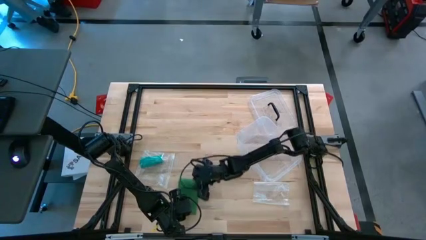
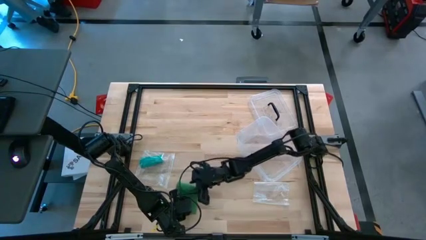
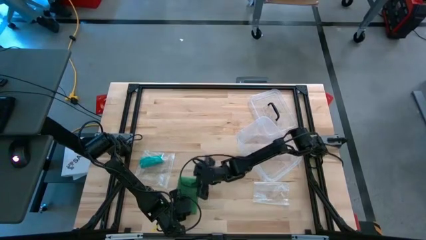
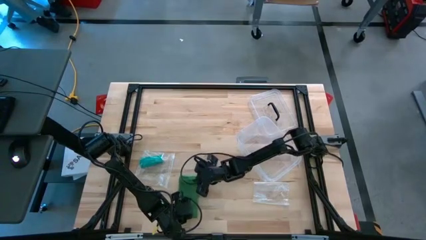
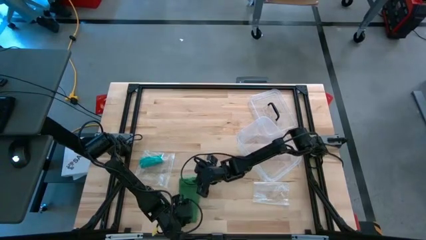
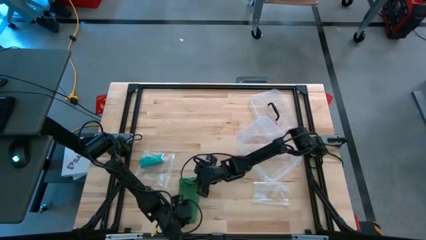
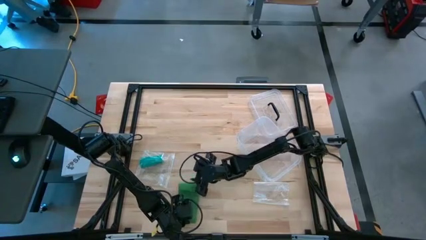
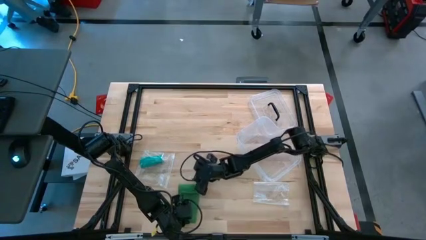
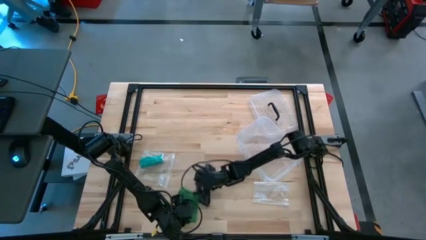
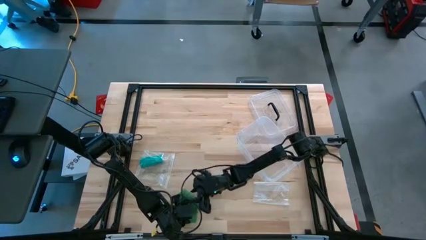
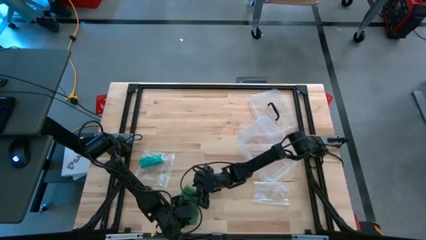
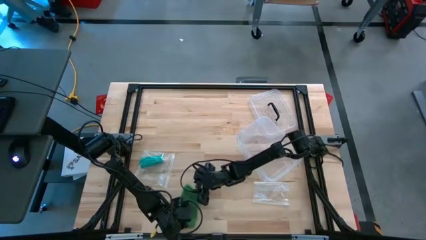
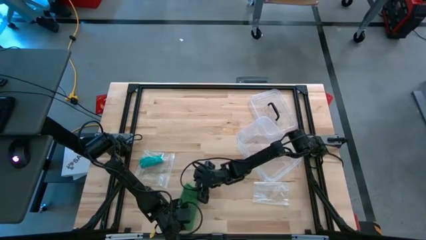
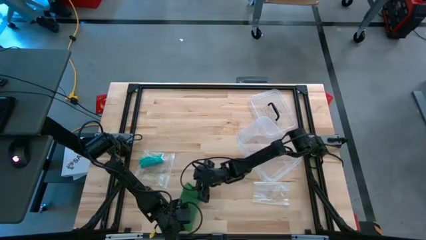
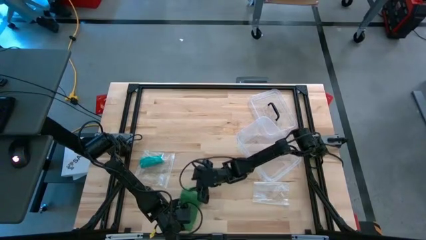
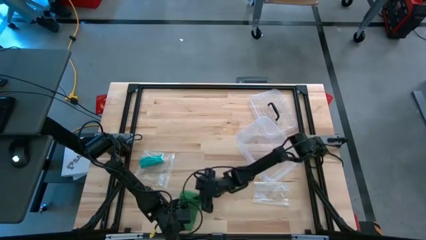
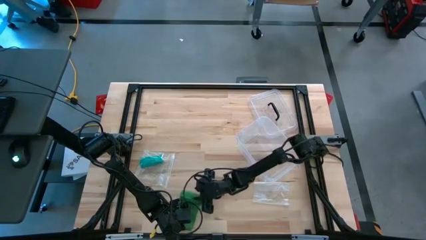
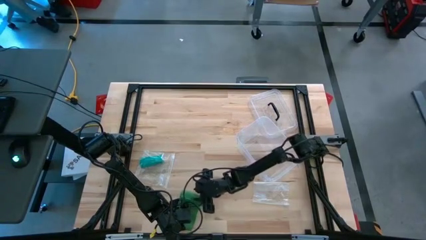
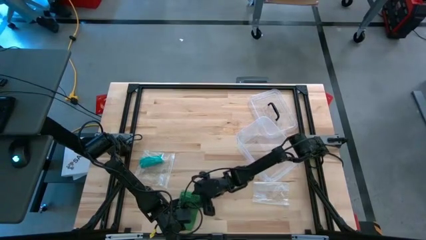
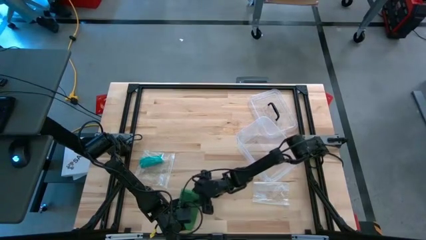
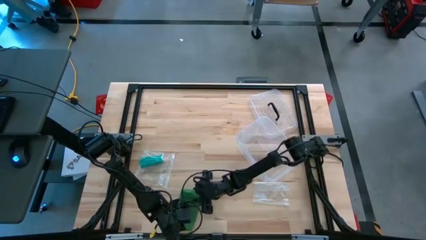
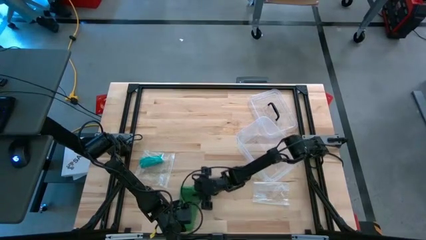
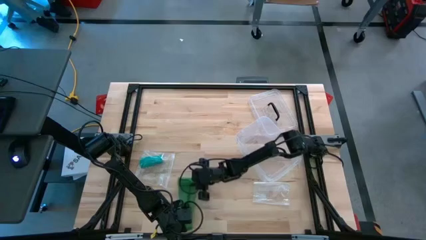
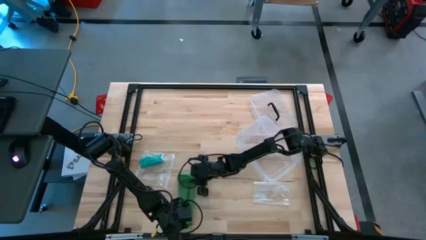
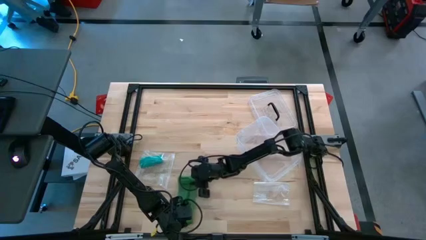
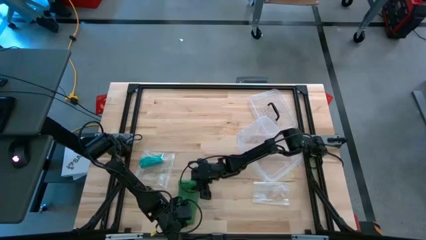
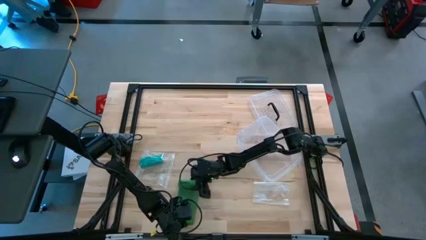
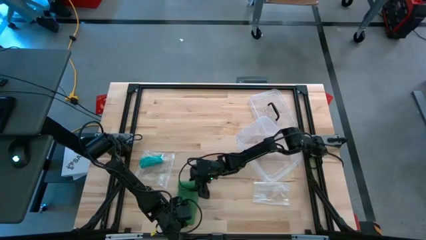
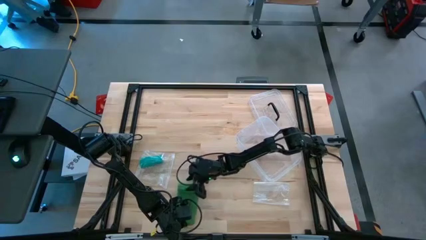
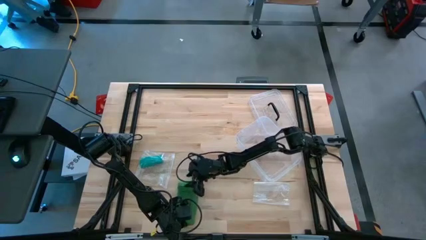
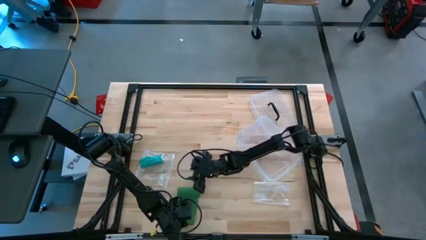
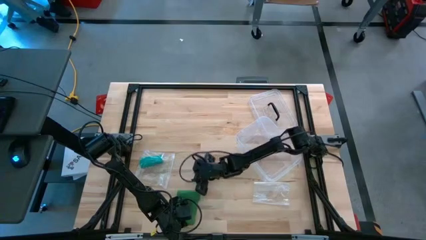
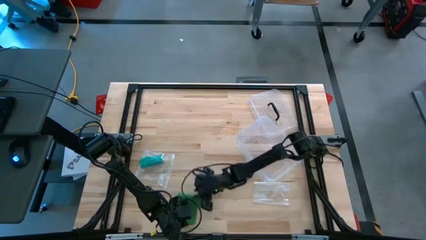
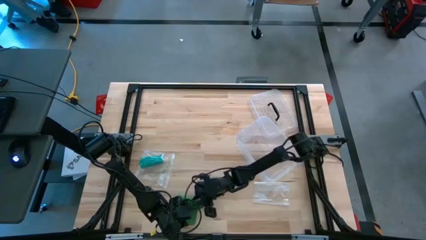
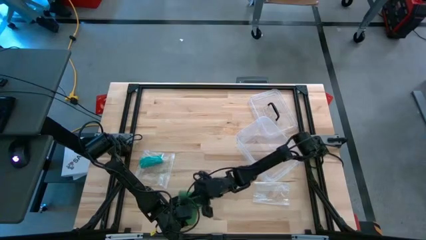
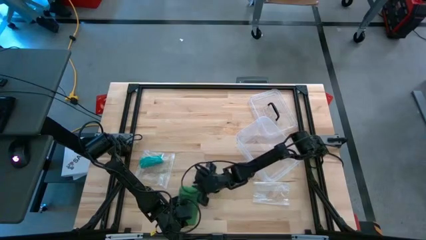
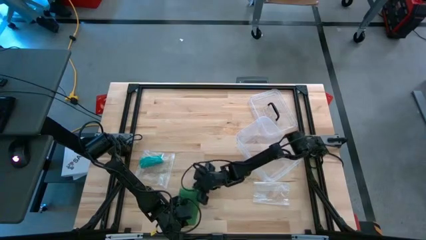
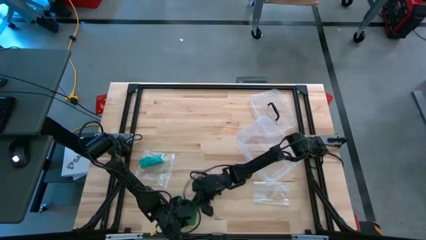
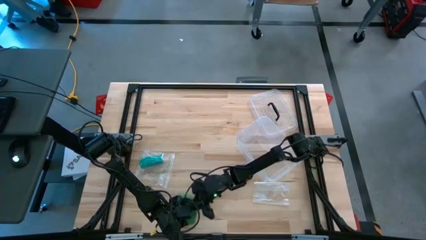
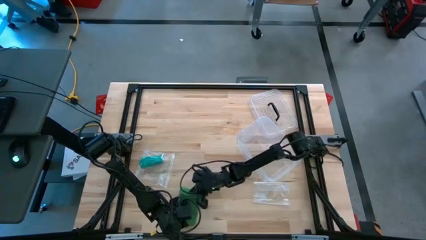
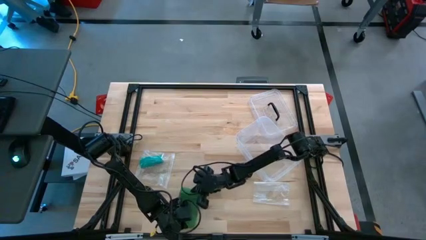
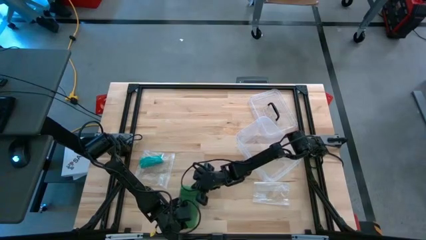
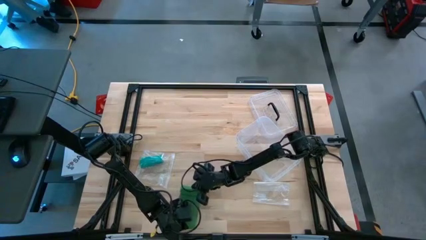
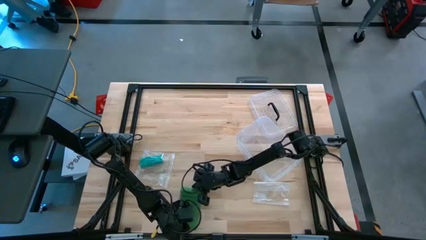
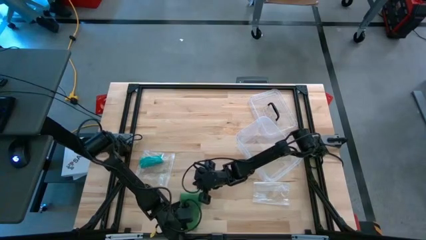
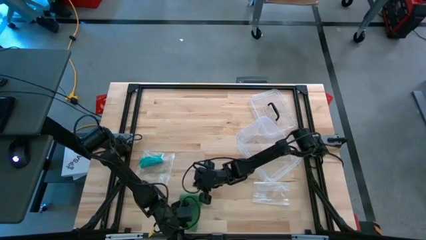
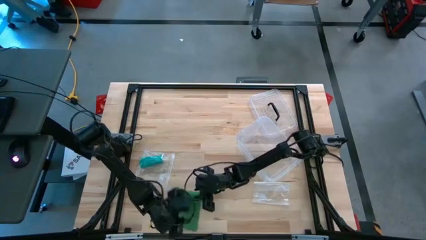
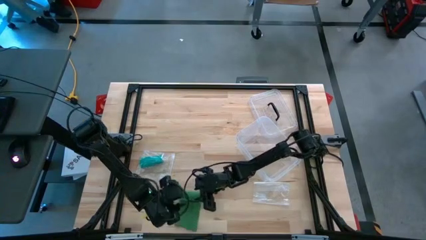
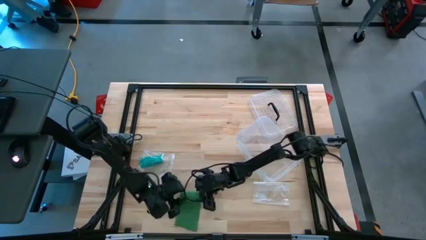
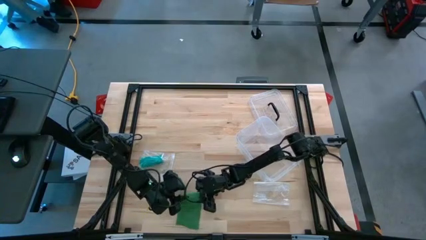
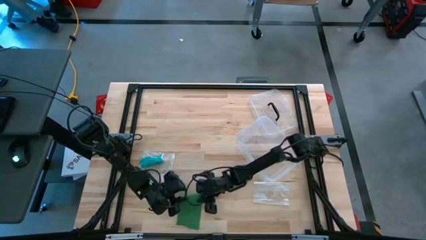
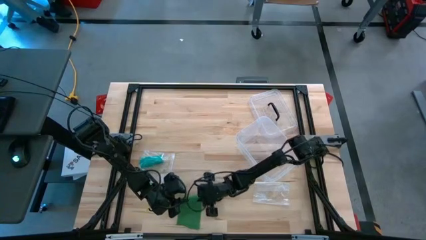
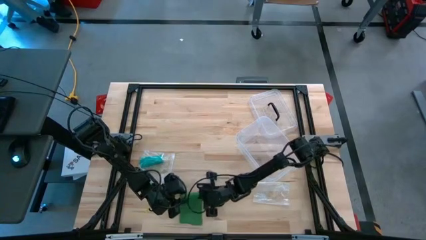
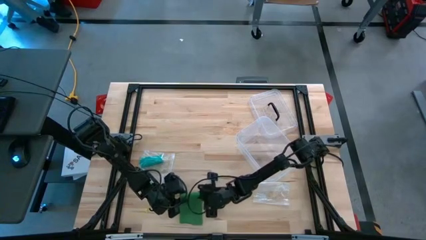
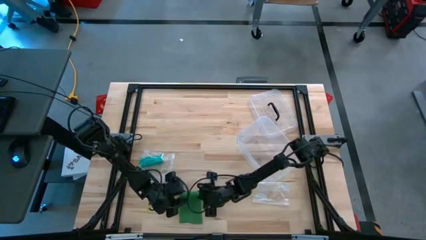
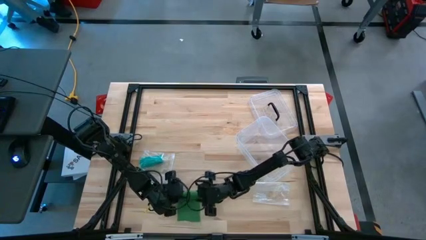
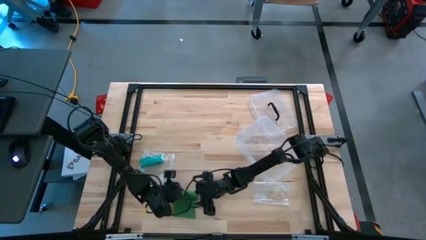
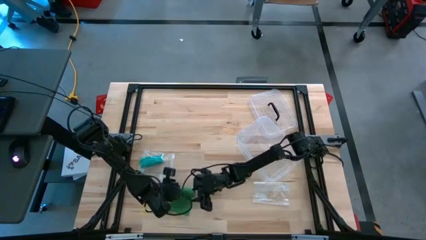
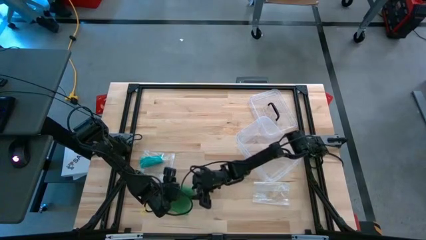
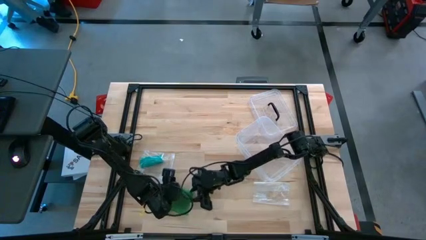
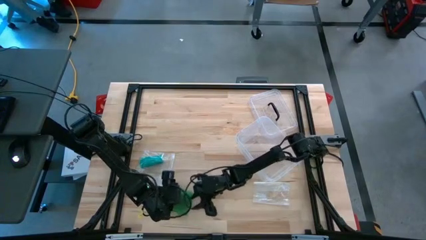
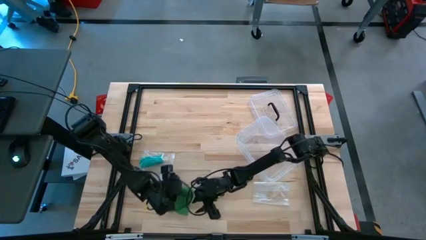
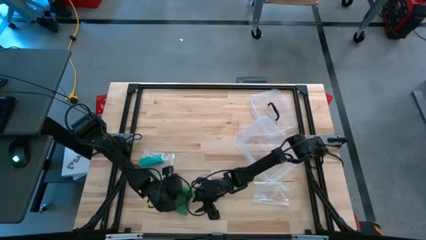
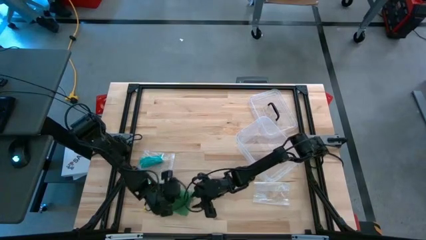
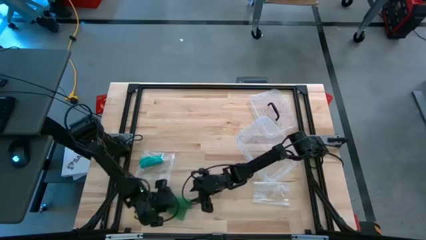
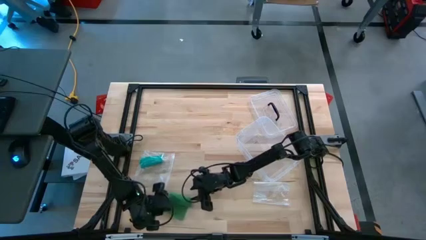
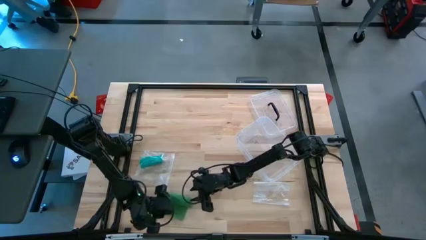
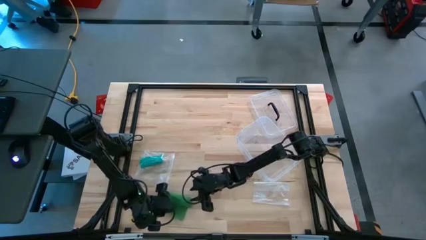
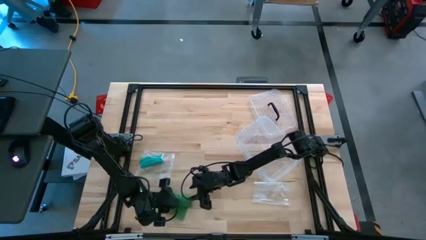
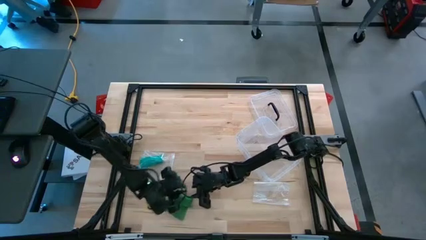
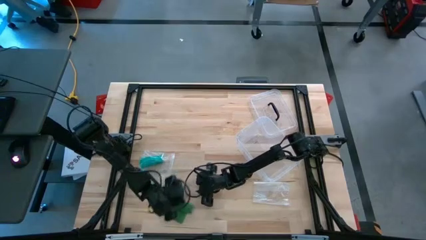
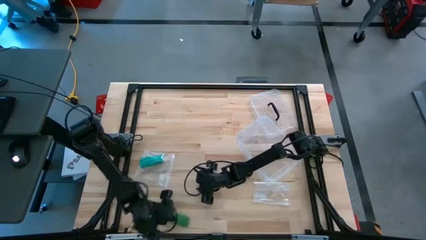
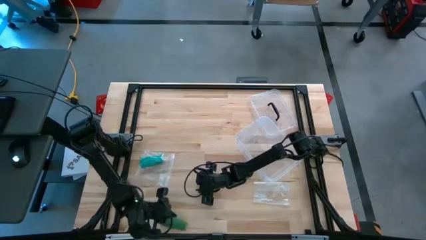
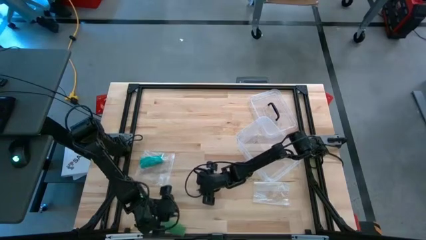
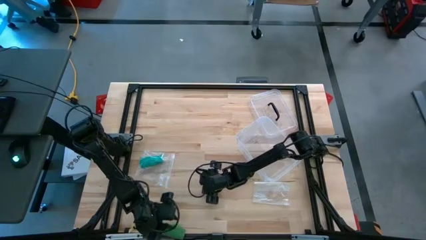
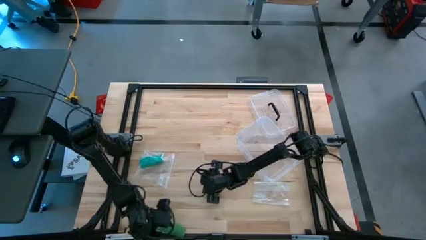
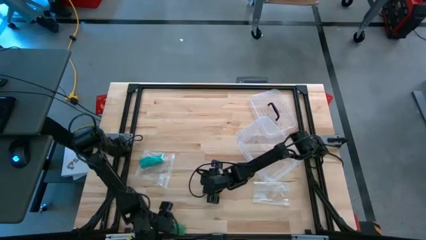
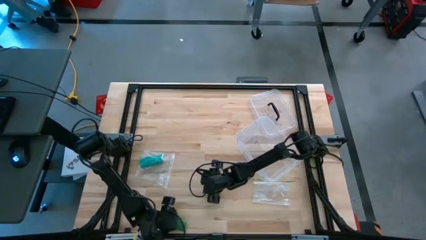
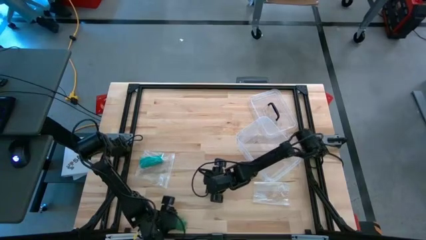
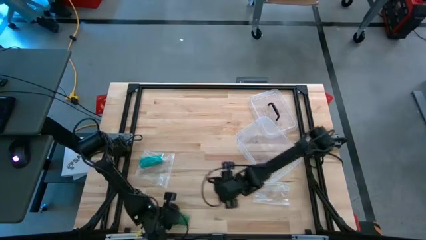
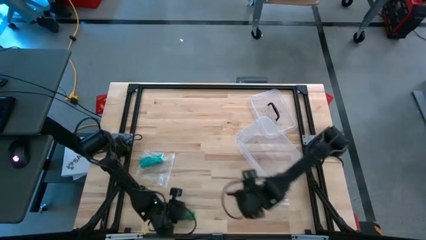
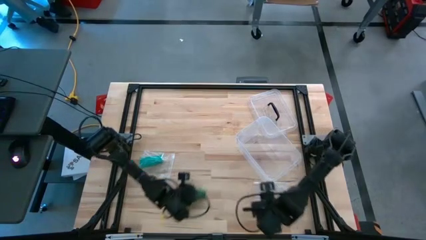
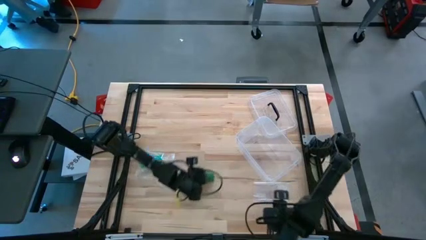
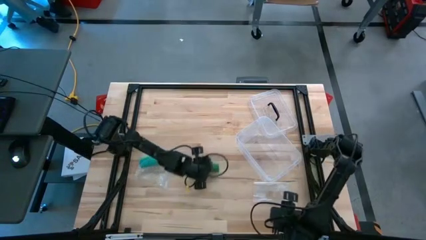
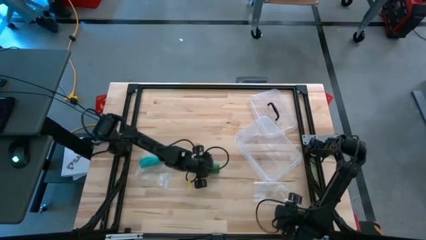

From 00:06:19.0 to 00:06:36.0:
Task: Roll bandage
Roll the green bandage
